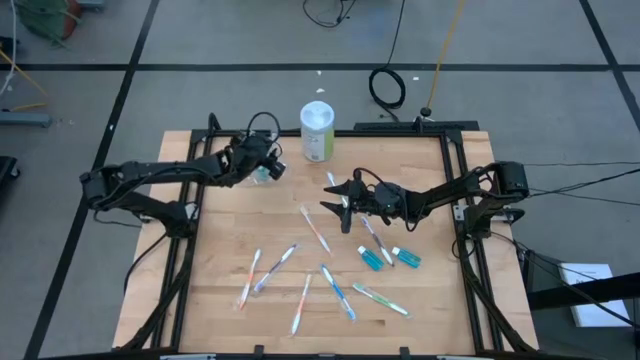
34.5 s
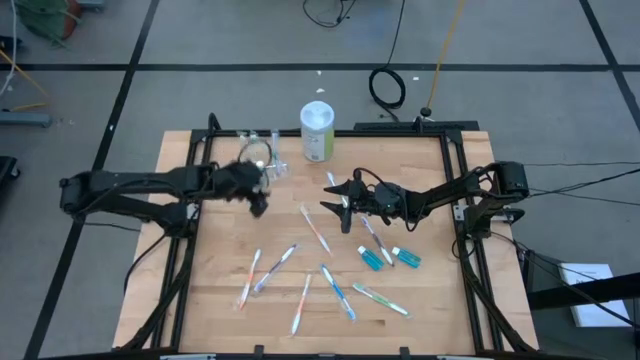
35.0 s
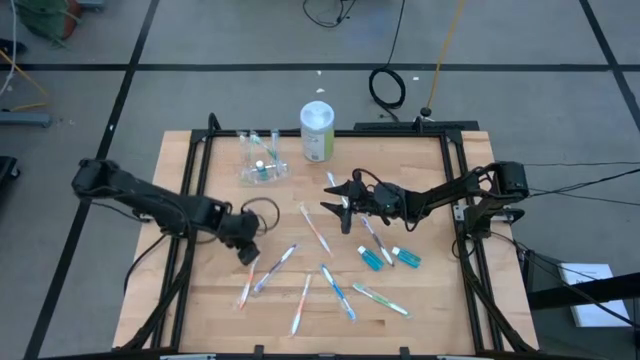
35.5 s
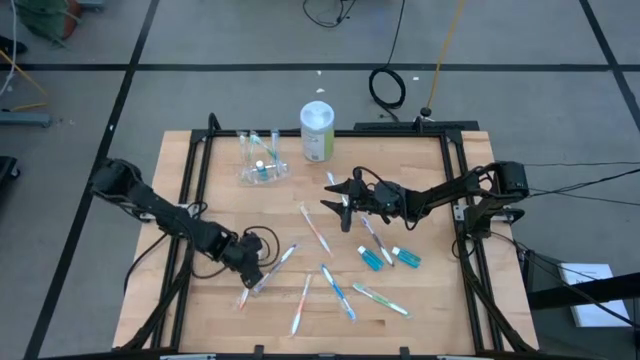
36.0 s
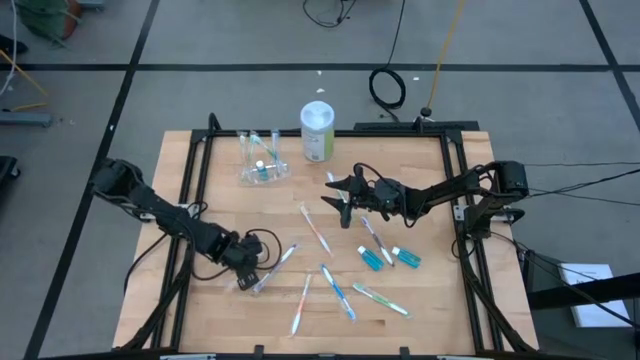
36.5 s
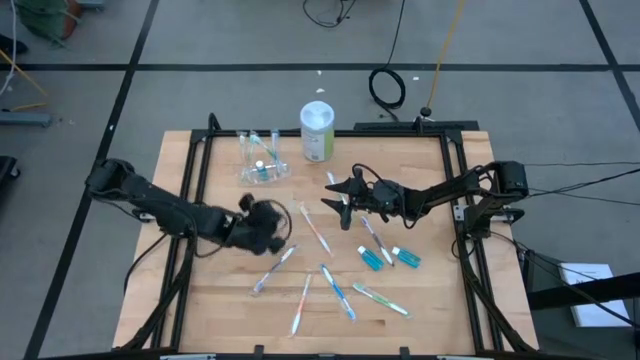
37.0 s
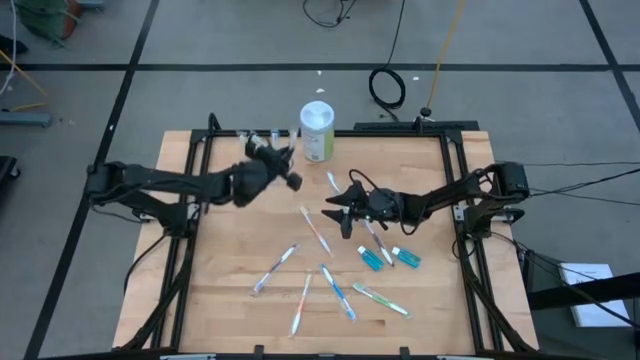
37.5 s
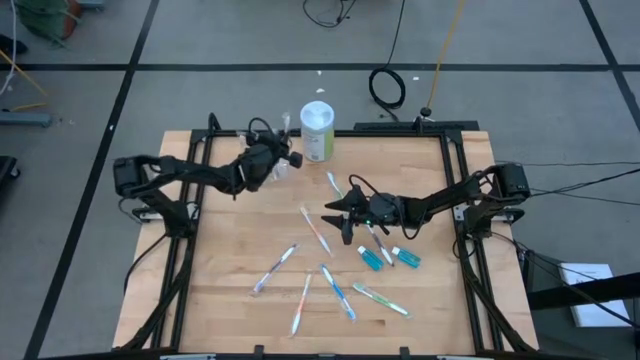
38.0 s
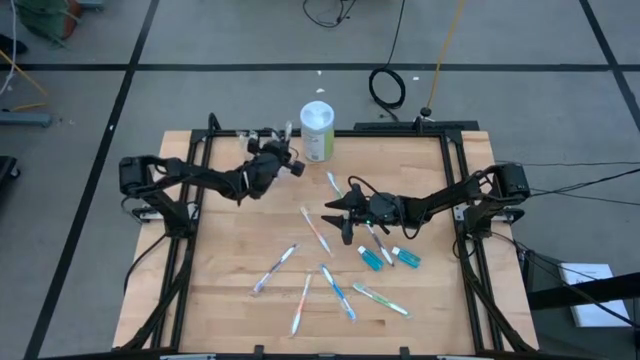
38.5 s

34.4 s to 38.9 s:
Task: Pick & Place toothbrushing station
Put the left orange toothbrush into the transparent organizer

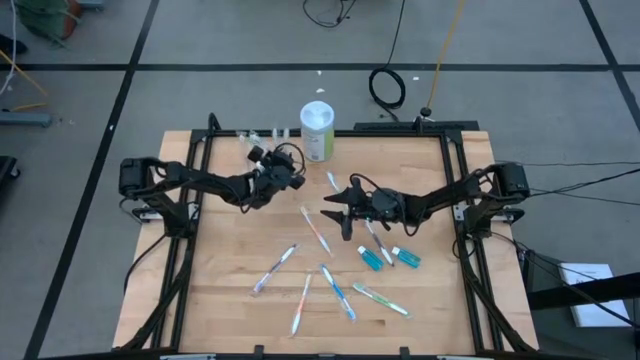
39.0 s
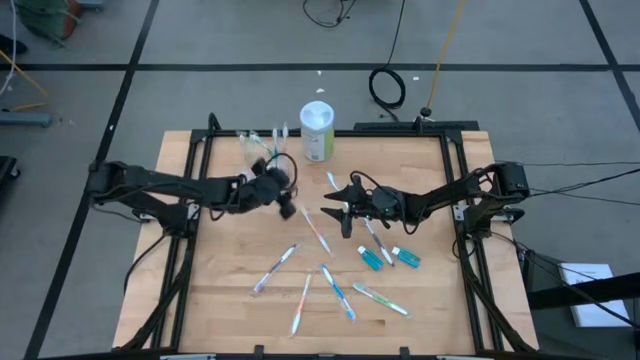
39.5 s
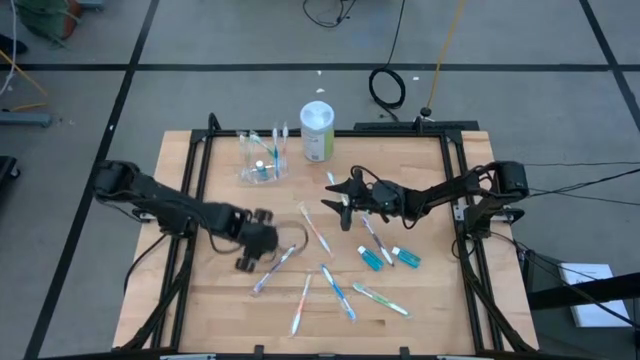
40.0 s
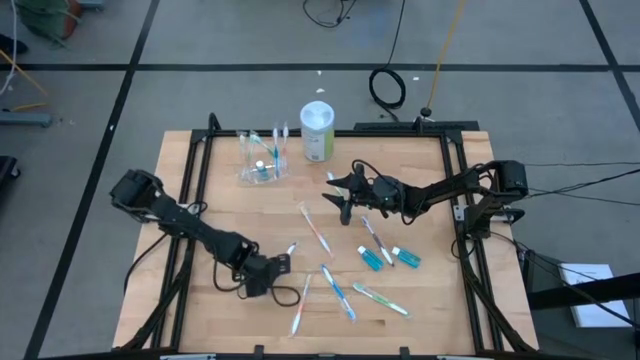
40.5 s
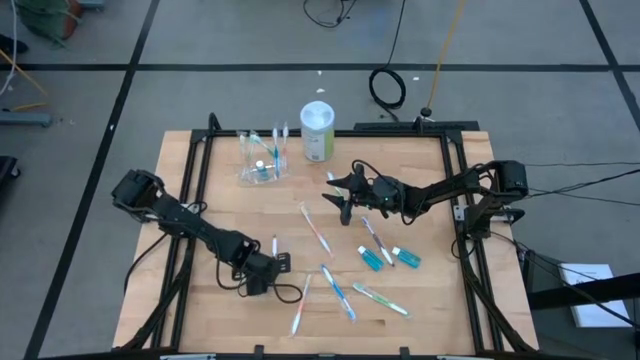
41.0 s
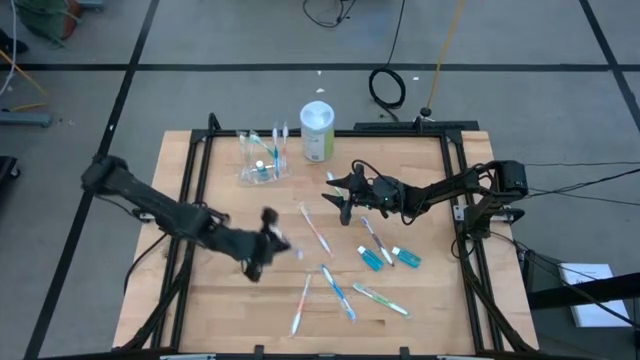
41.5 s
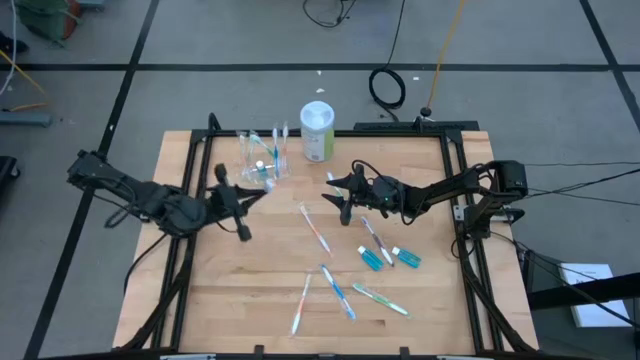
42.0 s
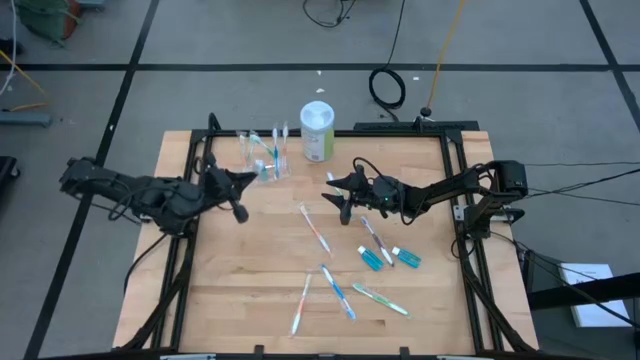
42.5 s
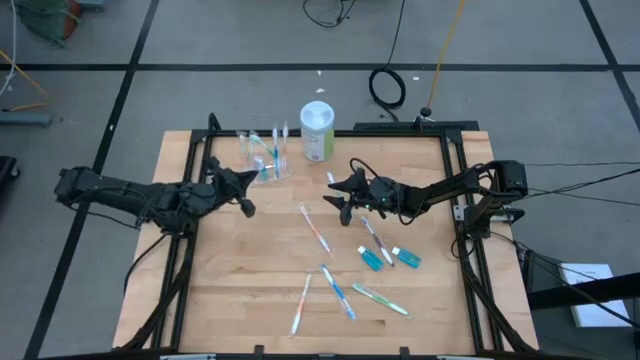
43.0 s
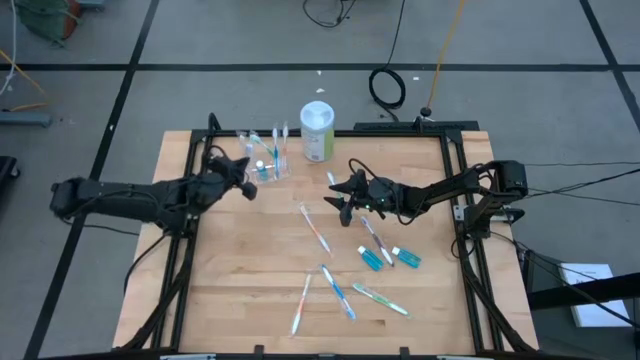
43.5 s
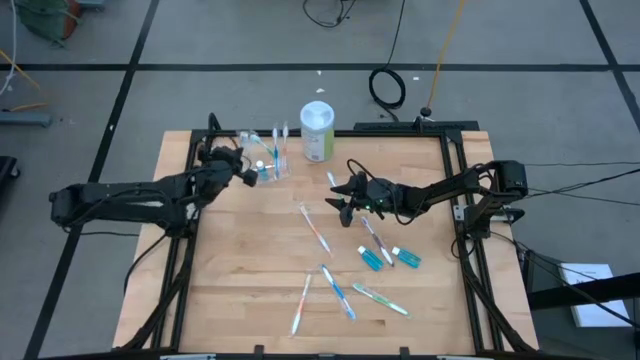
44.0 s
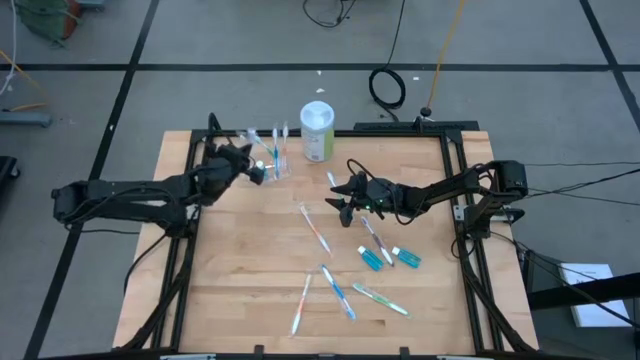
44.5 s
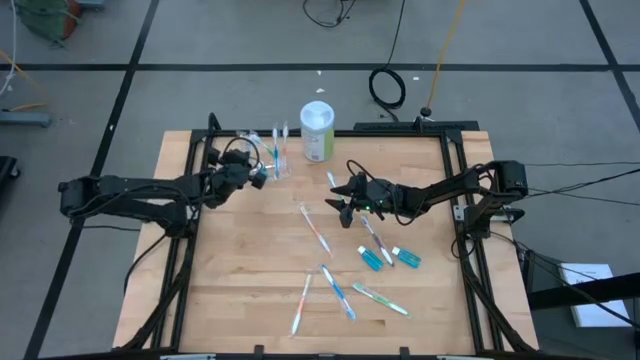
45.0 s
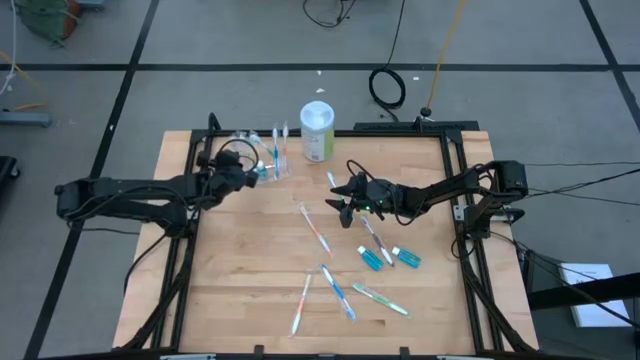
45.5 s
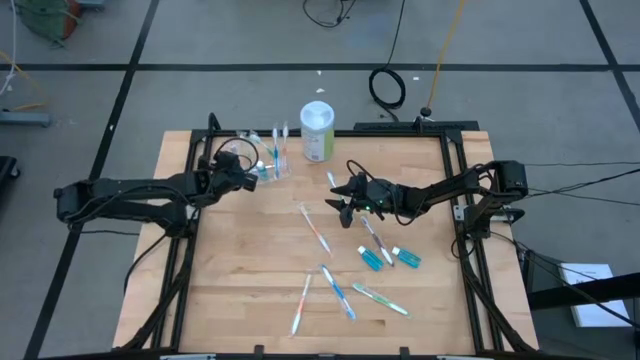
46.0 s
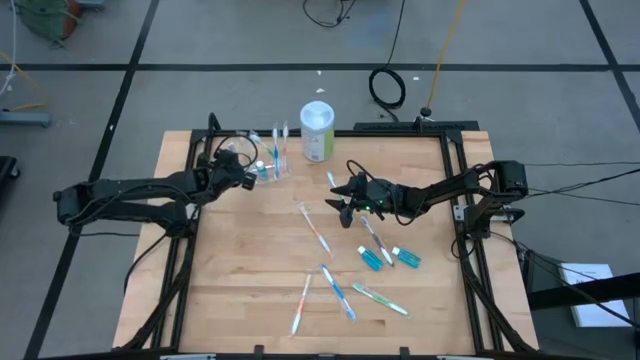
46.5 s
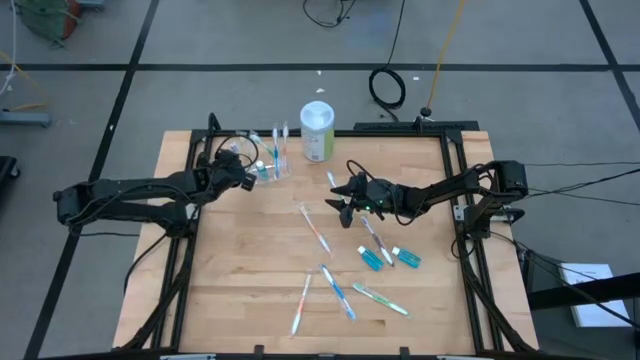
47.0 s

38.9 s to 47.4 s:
Put the left violet toothbrush into the transparent organizer

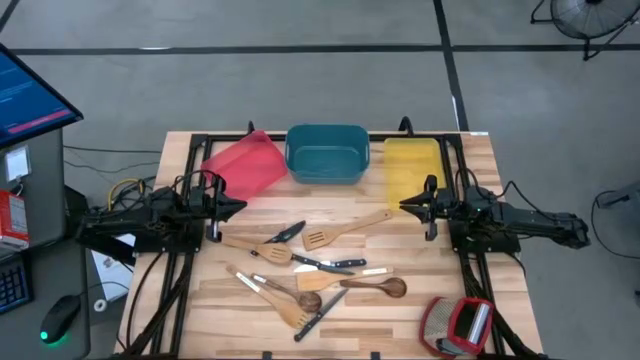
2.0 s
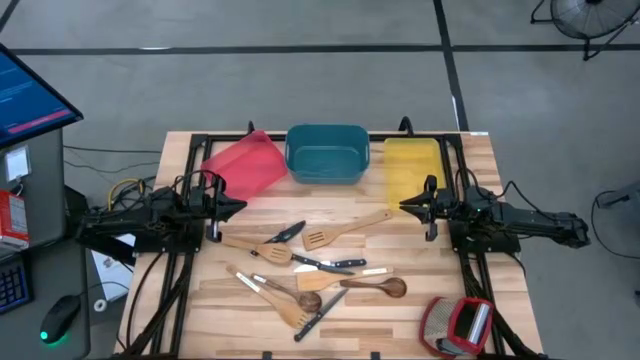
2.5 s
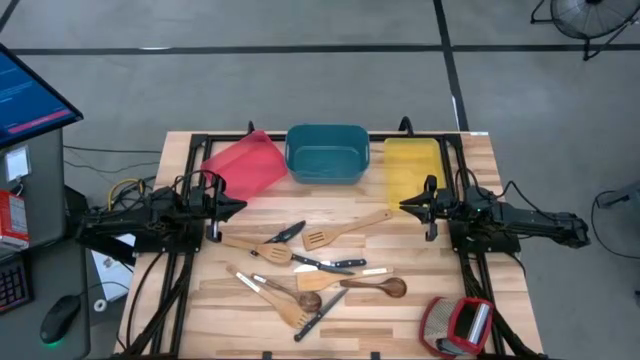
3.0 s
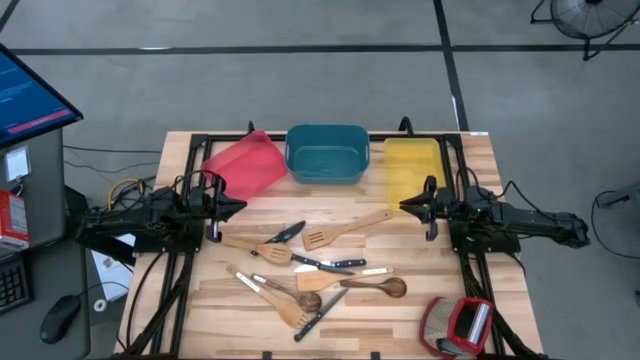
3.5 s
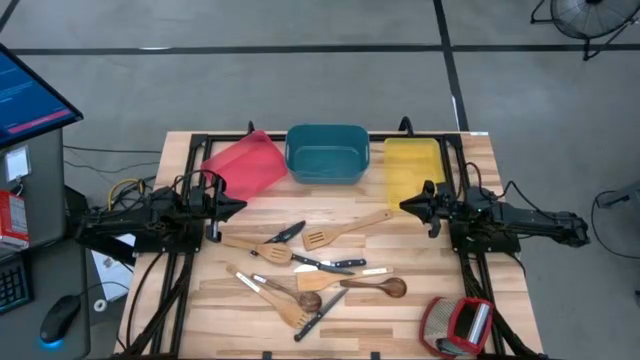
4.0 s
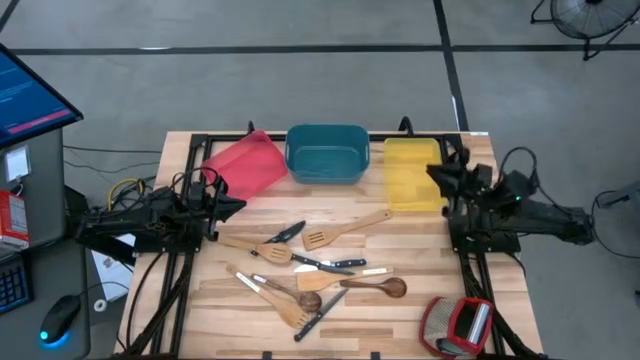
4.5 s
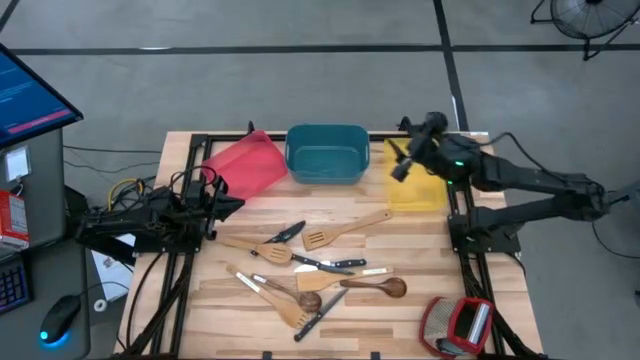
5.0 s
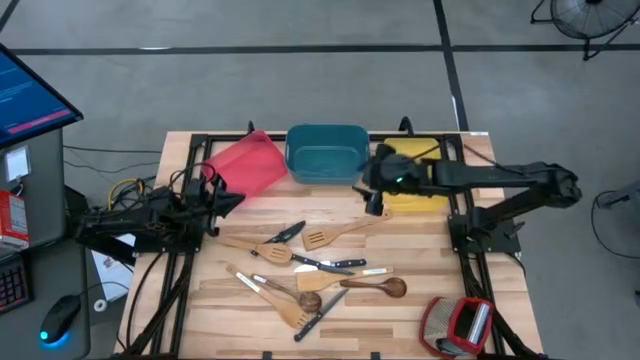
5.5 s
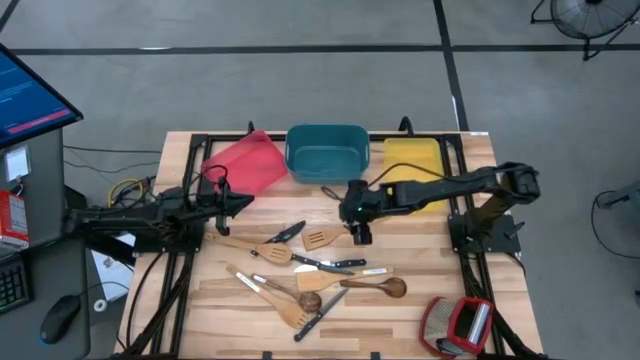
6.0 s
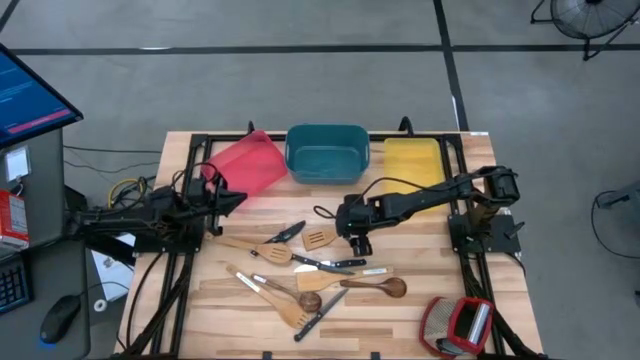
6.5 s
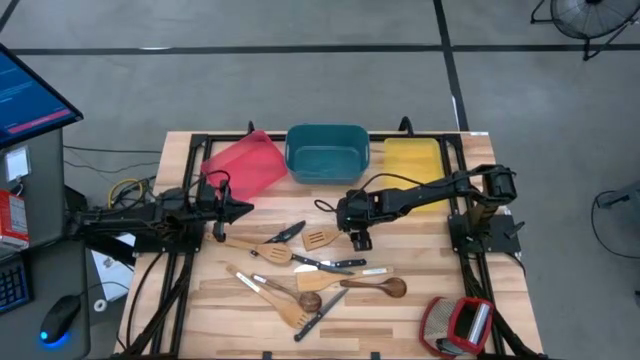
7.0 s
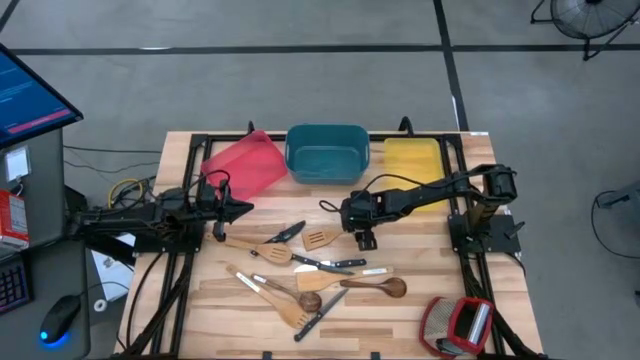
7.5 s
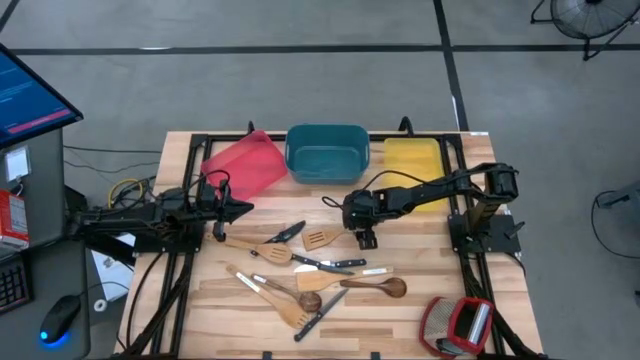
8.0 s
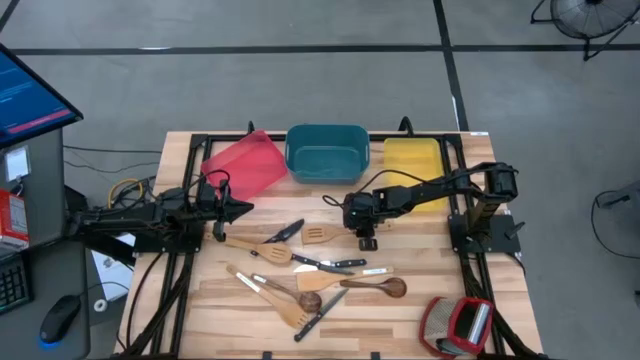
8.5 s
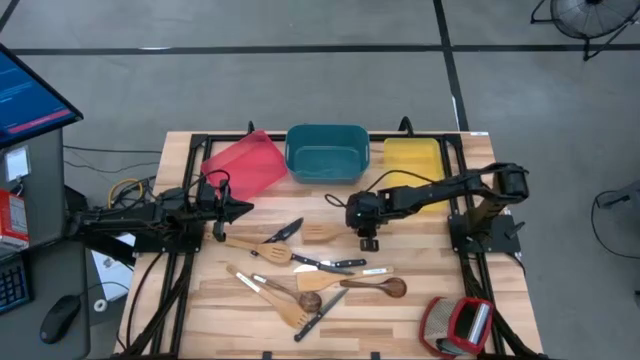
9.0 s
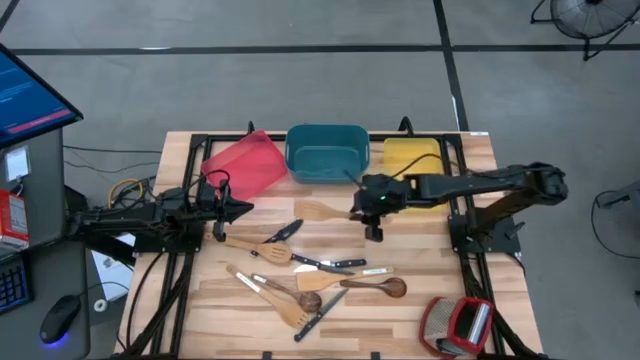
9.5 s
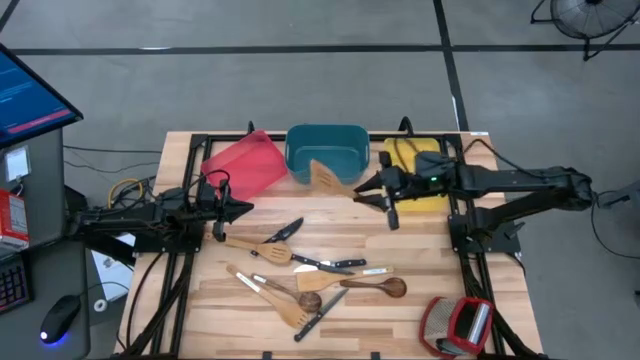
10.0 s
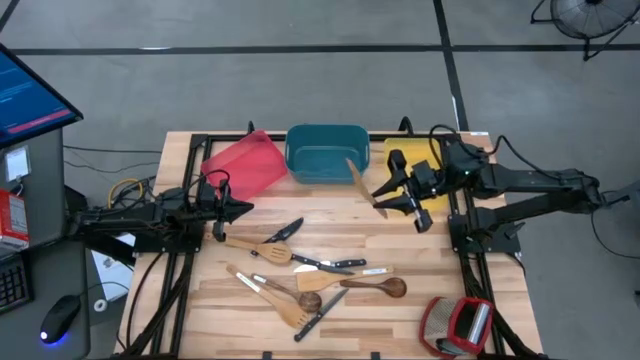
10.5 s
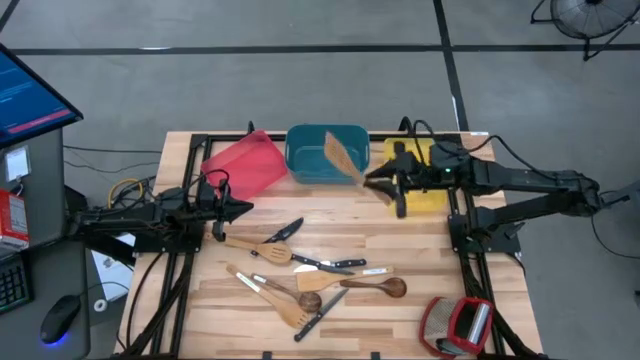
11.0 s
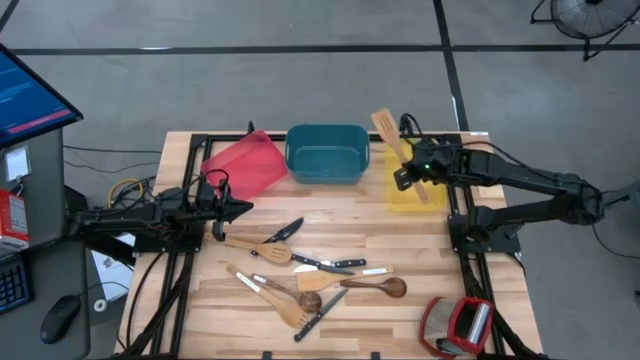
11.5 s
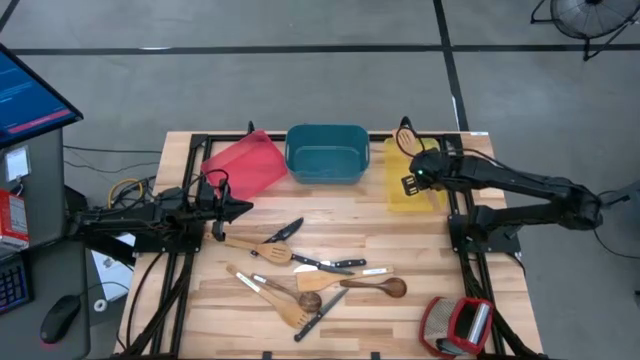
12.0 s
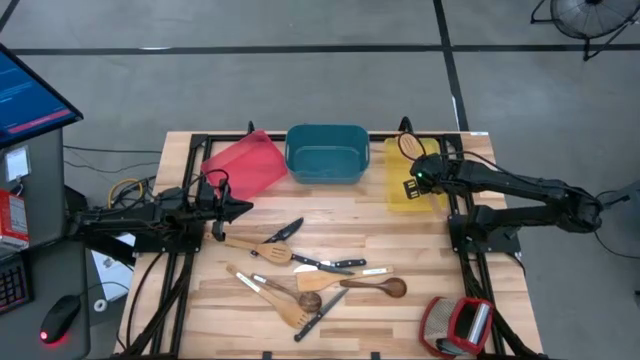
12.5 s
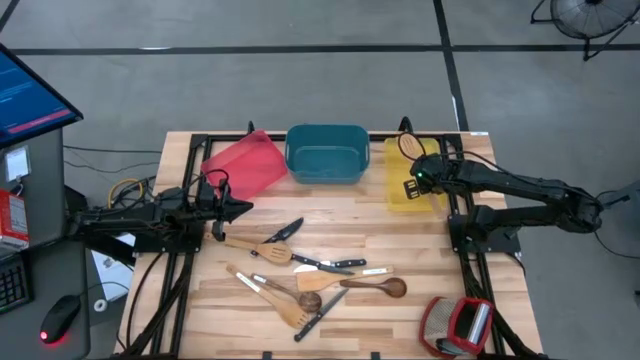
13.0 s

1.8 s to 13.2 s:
Task: Pick & Place Kitchen Items
Put the slotted wooden spatula into the yellow bin
